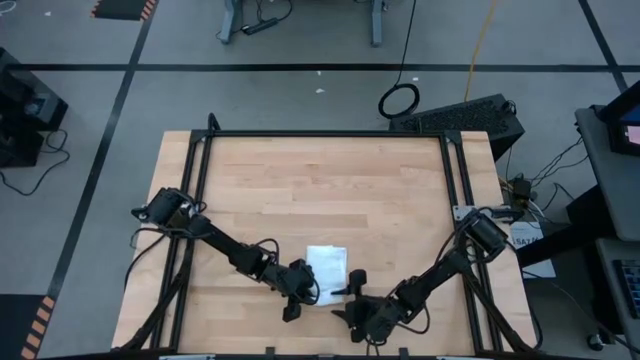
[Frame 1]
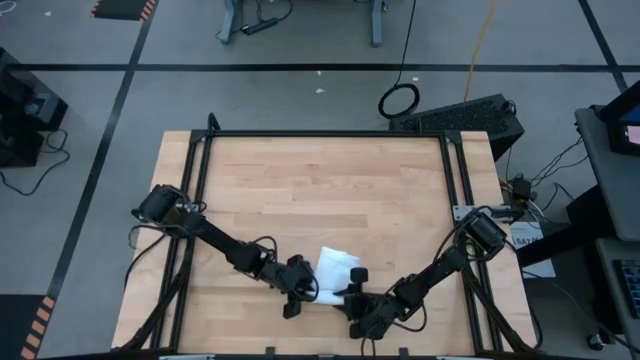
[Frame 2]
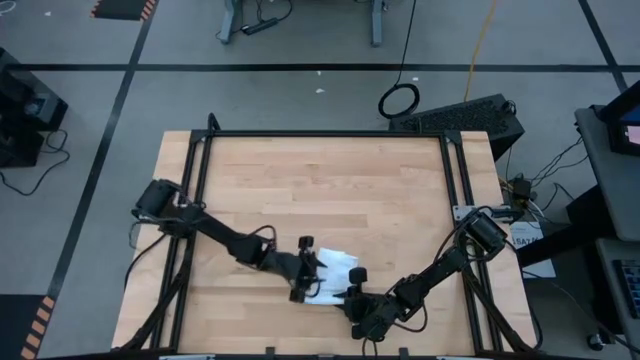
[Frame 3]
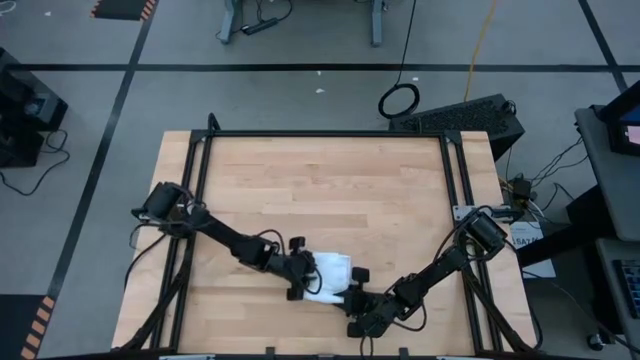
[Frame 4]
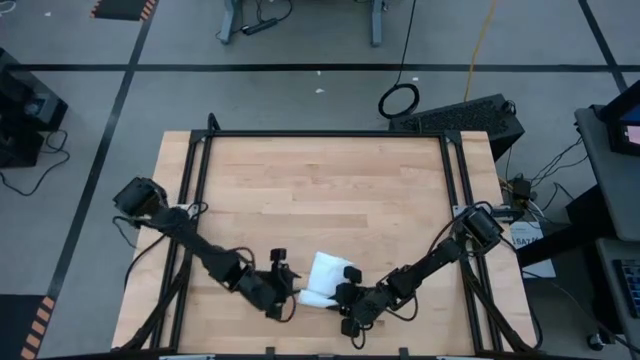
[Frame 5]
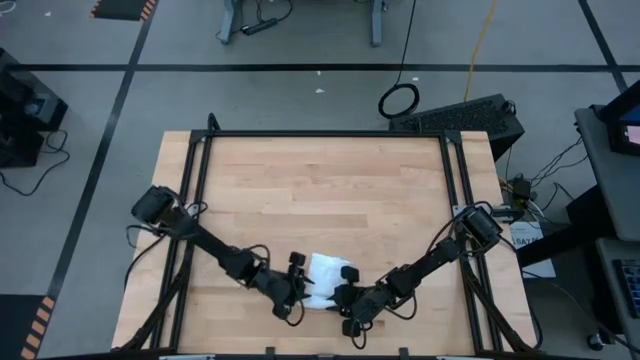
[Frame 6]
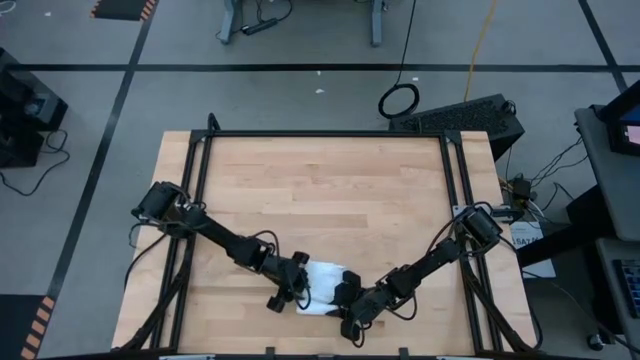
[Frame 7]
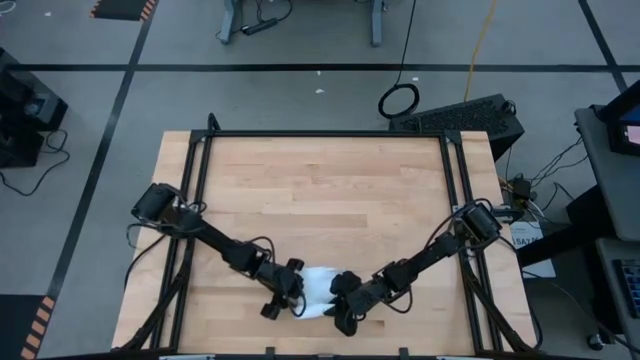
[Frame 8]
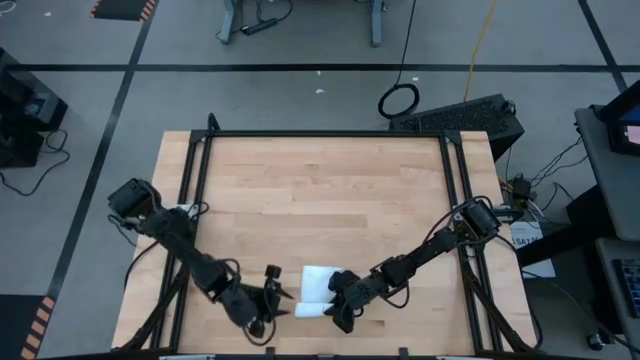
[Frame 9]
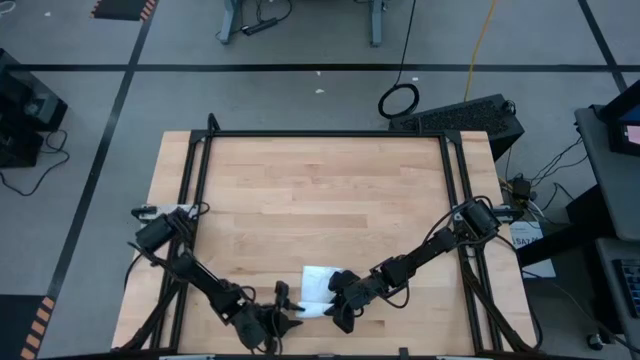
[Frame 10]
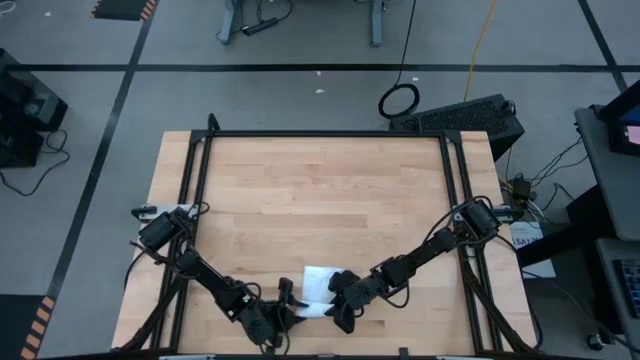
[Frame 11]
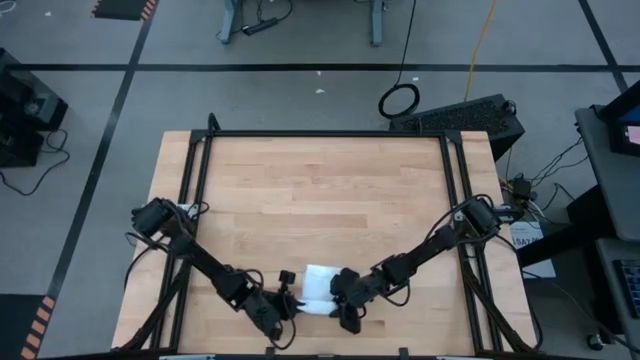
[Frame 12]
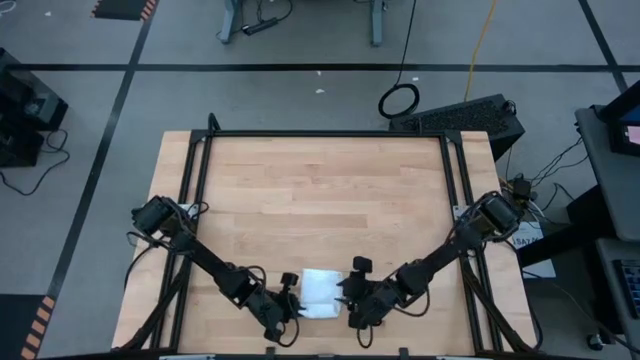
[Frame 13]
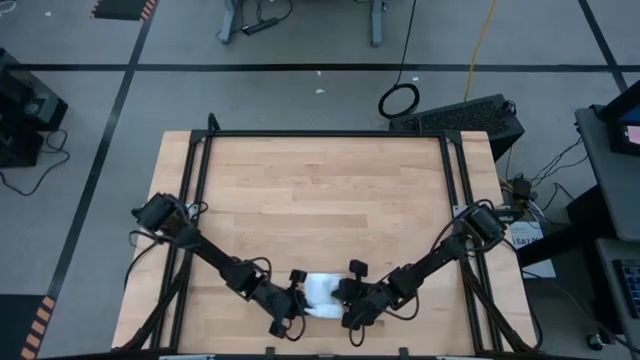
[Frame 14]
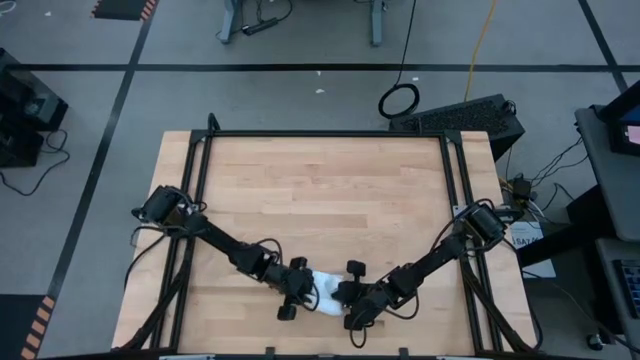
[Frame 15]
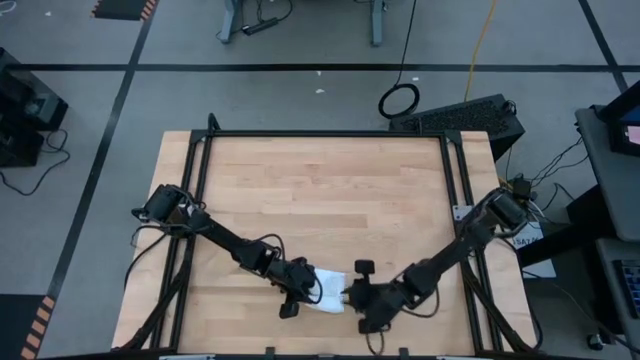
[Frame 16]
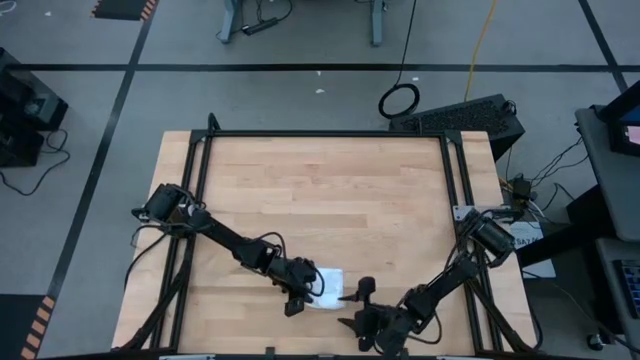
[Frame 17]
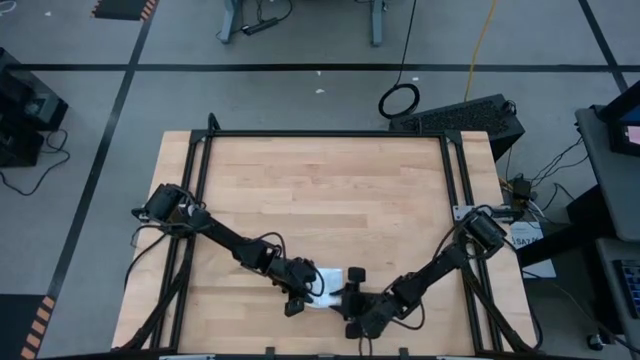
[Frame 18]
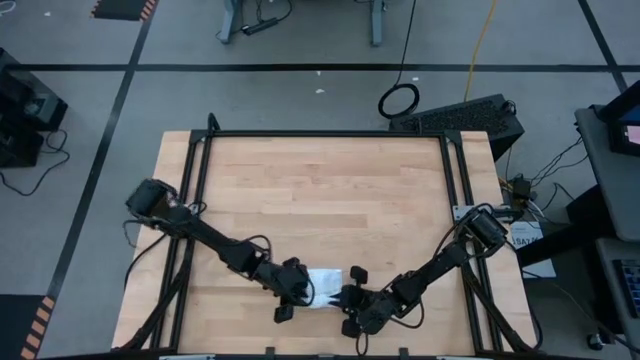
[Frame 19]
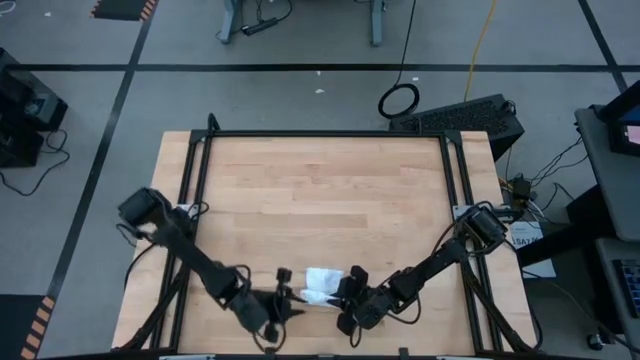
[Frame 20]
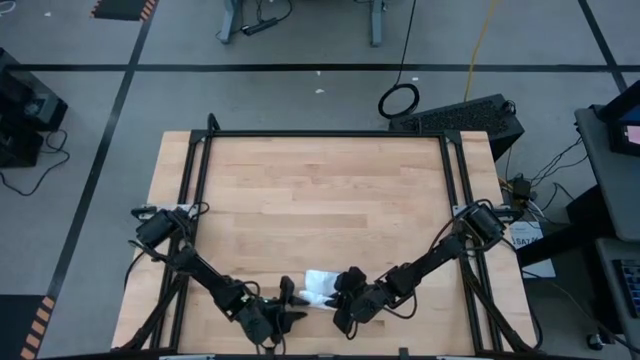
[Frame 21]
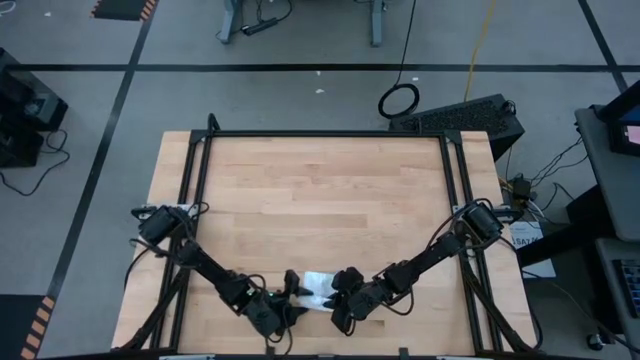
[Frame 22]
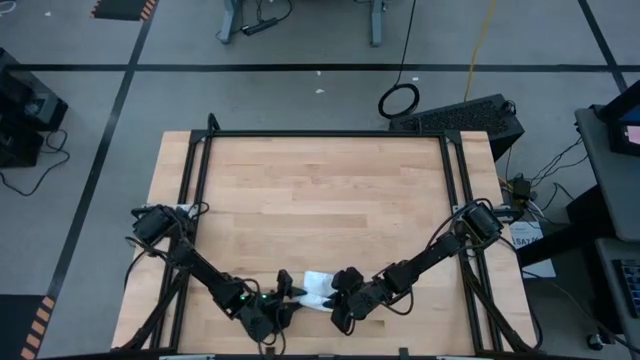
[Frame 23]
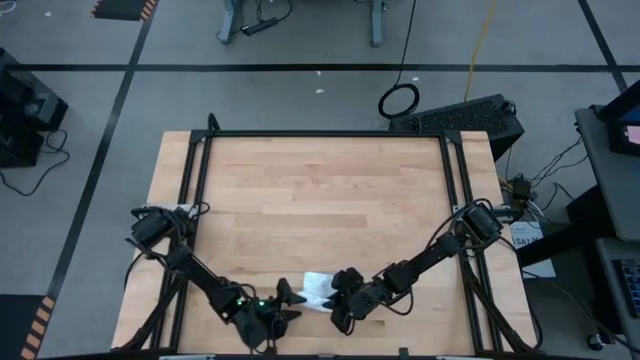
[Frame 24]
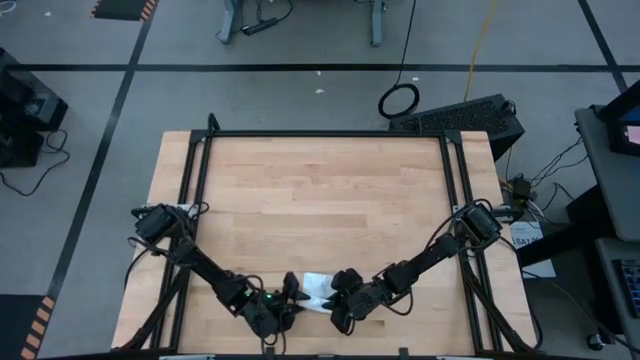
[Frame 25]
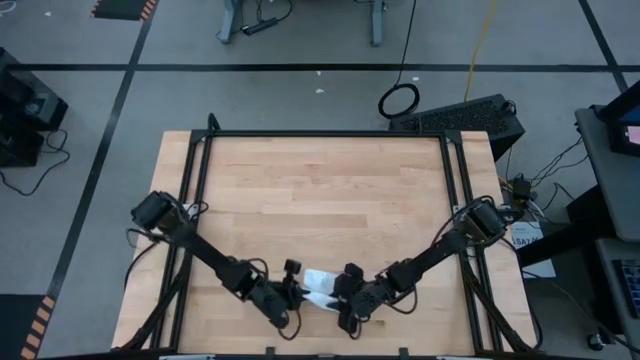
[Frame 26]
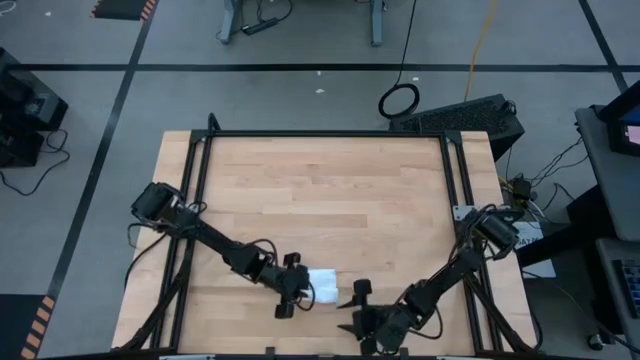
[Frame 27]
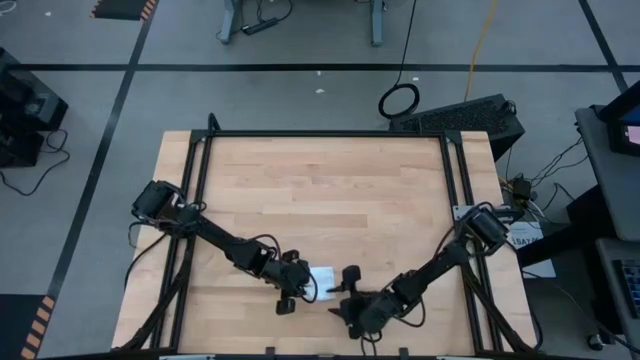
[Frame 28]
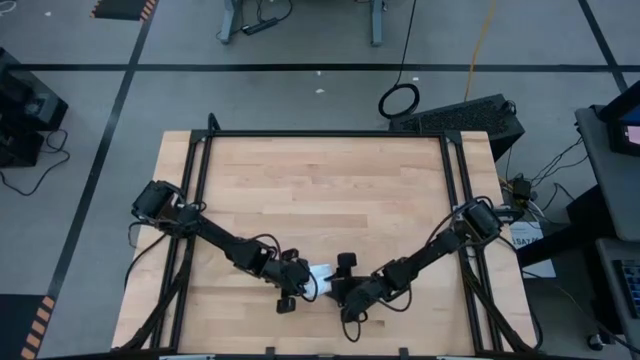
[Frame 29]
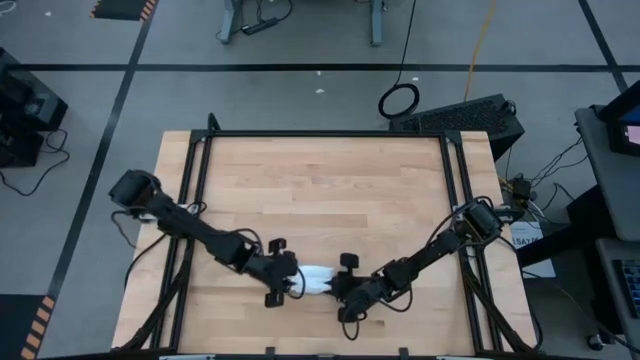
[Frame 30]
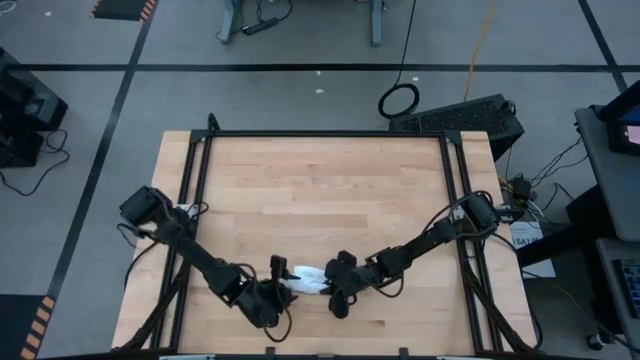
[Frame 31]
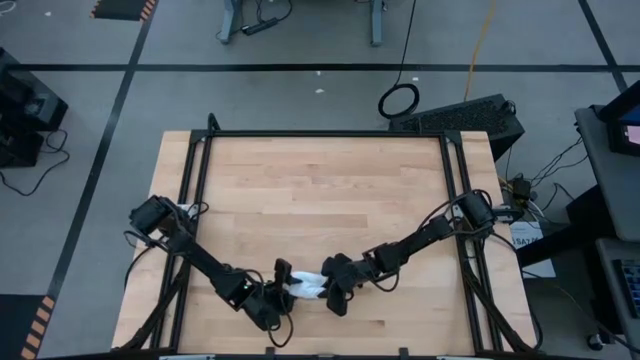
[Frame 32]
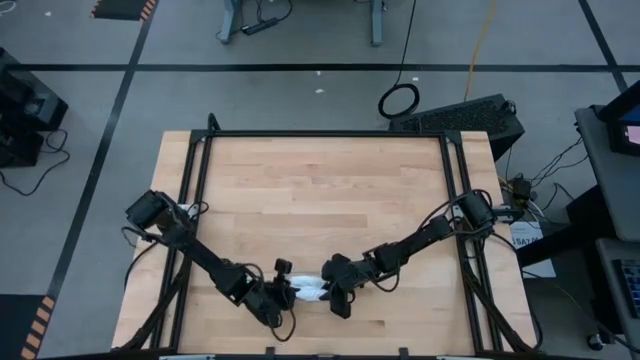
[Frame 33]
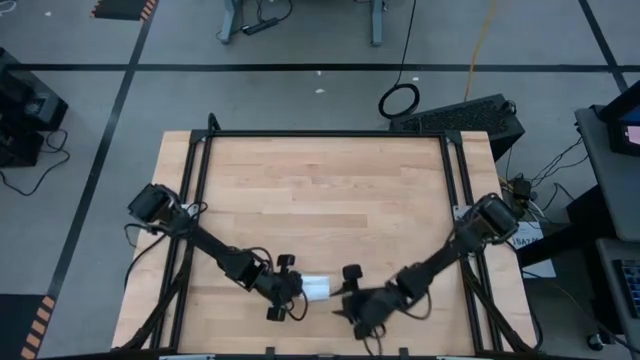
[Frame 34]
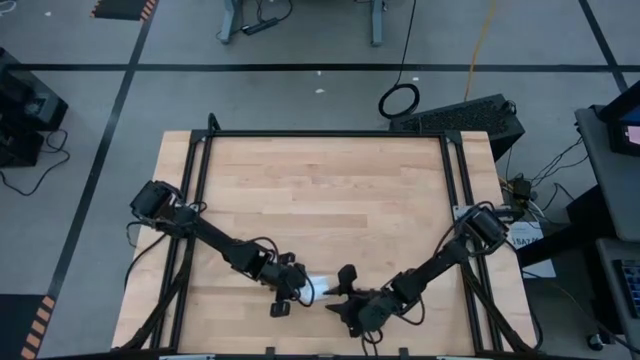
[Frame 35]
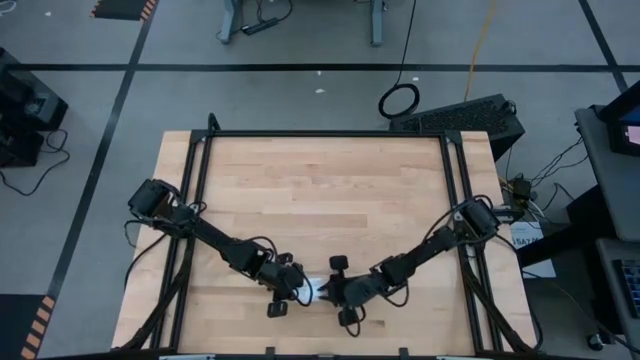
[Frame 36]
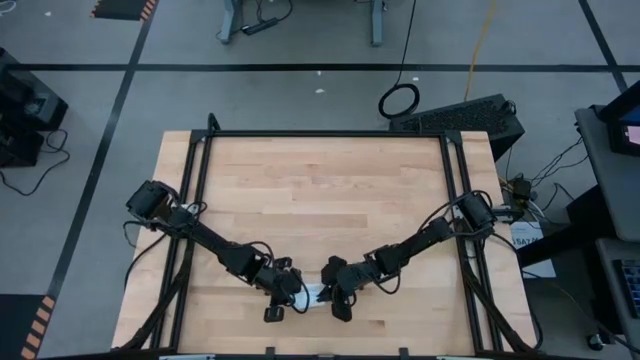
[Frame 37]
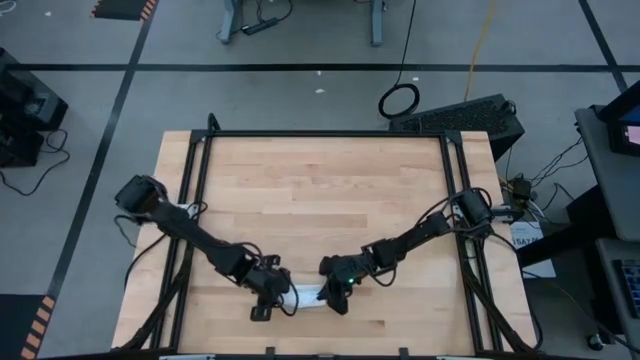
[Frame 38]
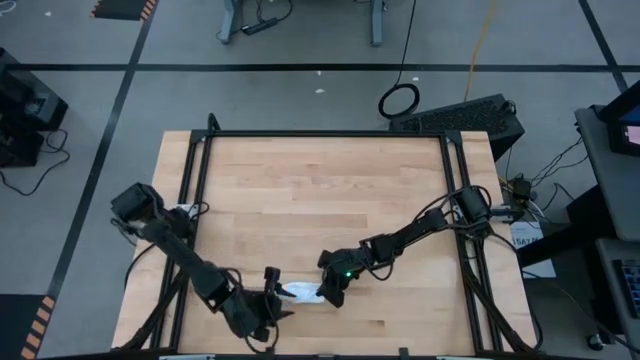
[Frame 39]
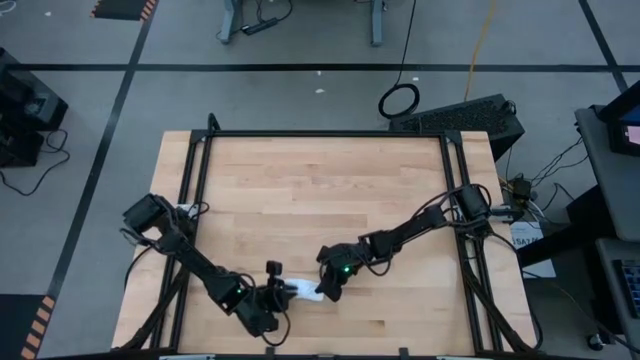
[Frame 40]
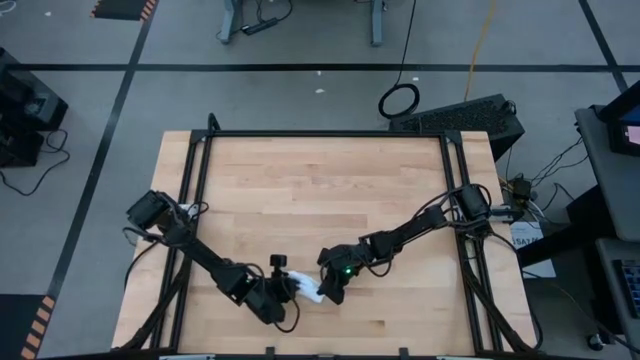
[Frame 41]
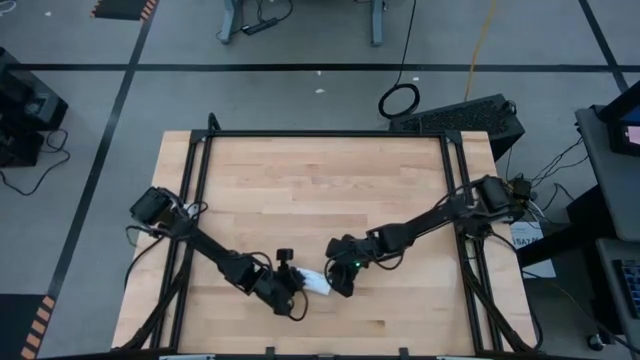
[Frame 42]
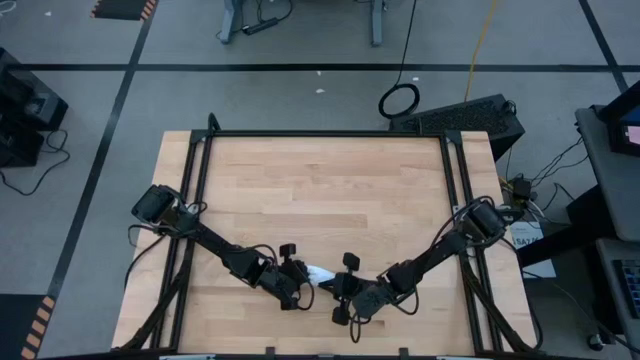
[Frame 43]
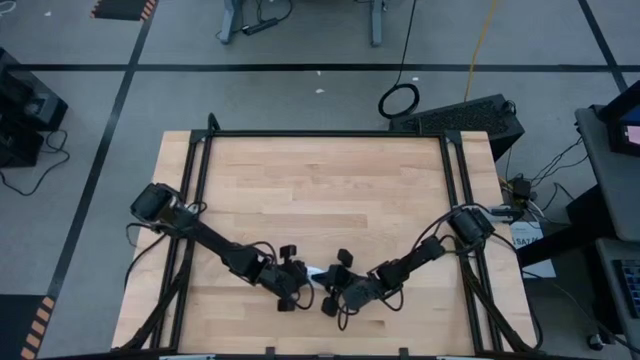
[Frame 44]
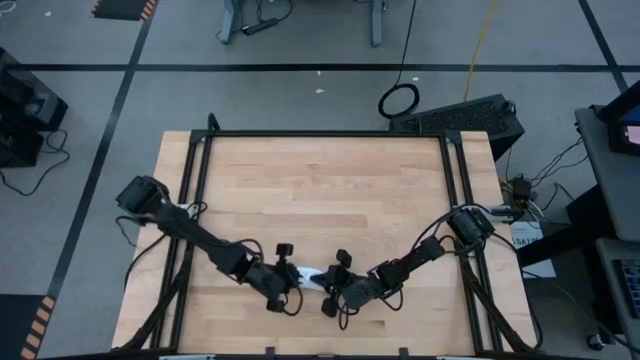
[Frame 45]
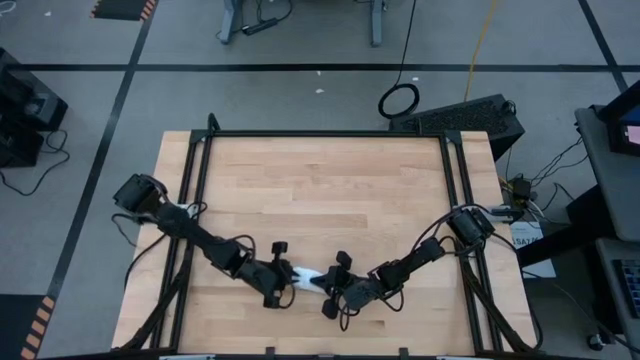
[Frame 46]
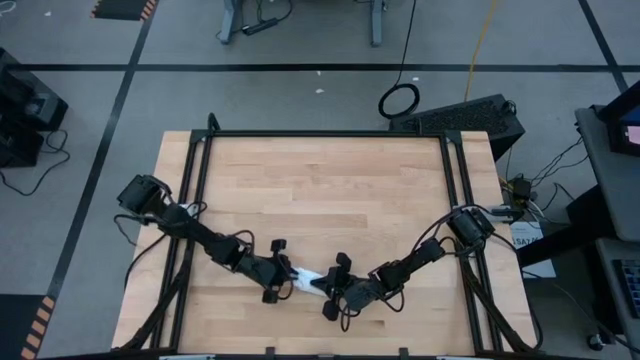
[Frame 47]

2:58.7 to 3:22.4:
Task: Roll napkin
Roll the white table napkin
